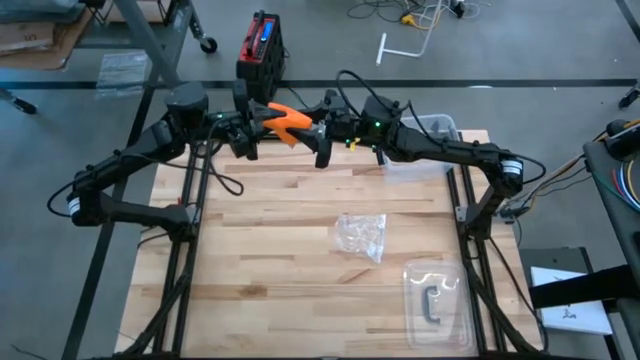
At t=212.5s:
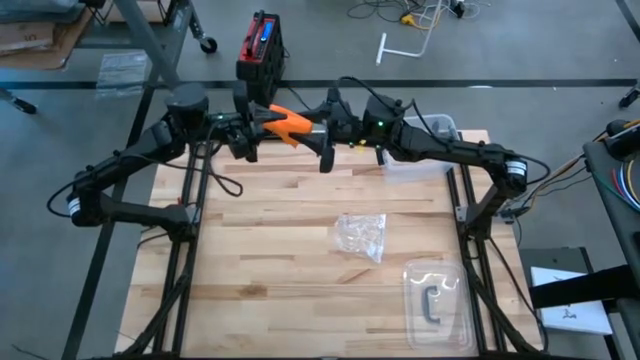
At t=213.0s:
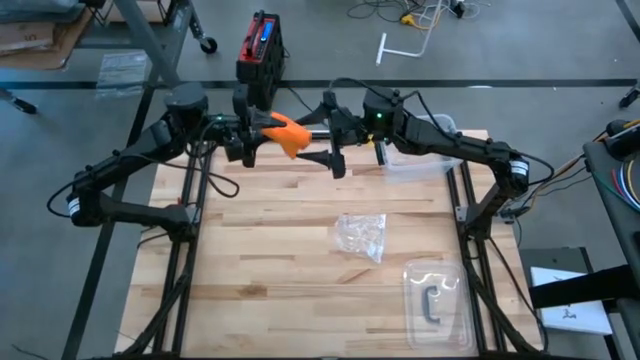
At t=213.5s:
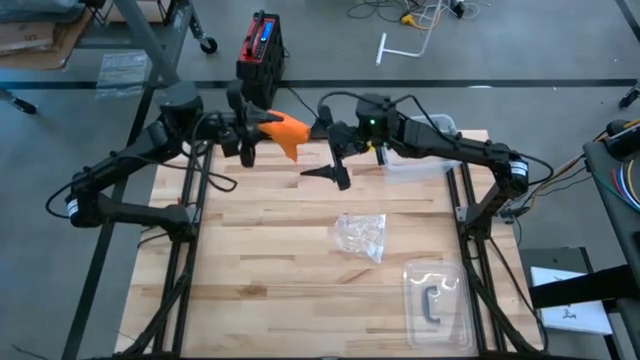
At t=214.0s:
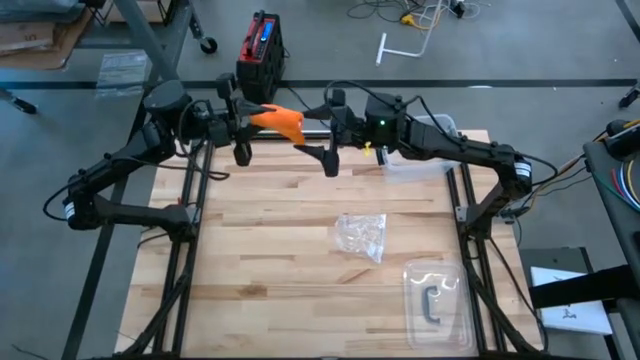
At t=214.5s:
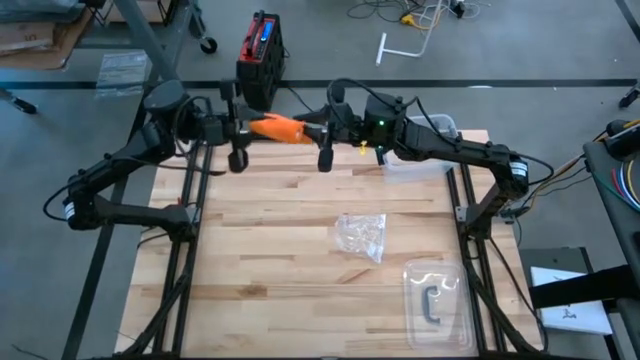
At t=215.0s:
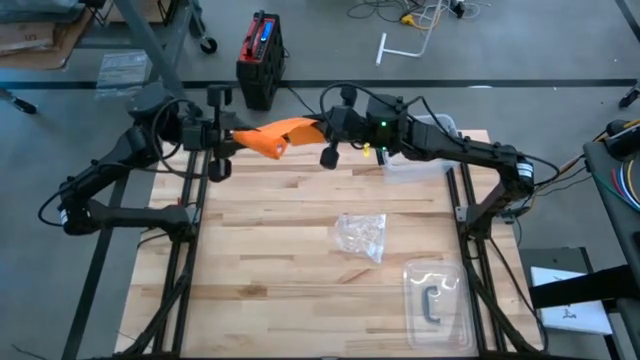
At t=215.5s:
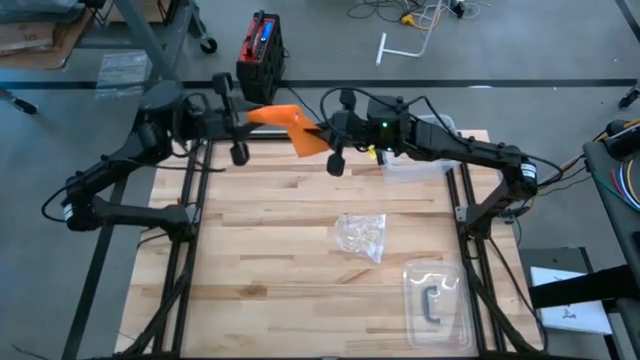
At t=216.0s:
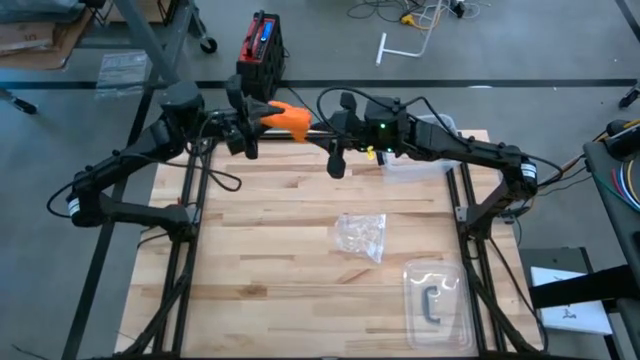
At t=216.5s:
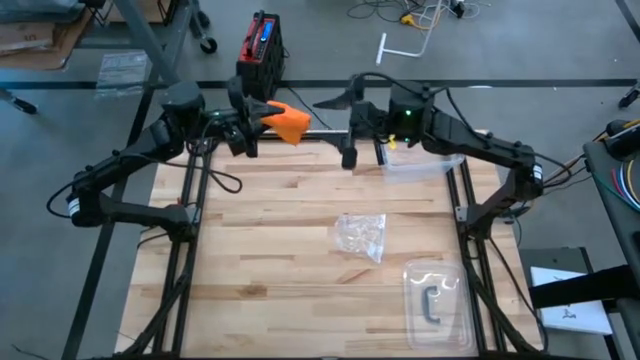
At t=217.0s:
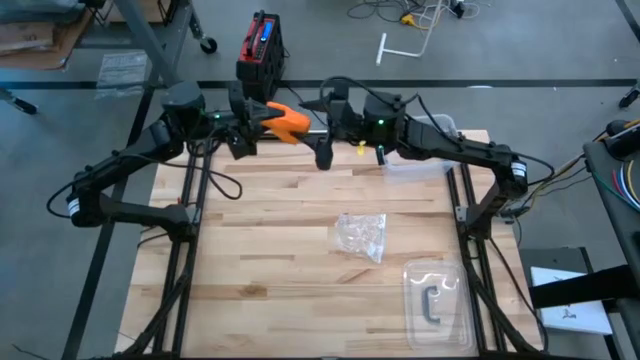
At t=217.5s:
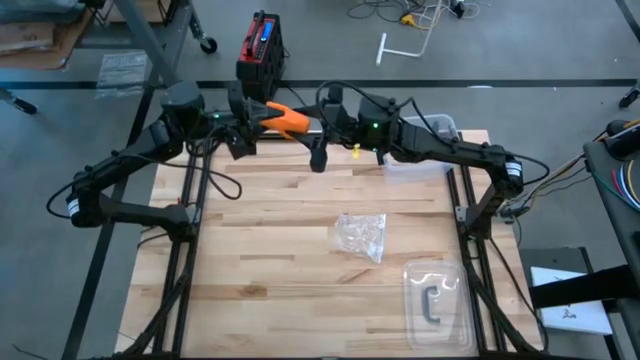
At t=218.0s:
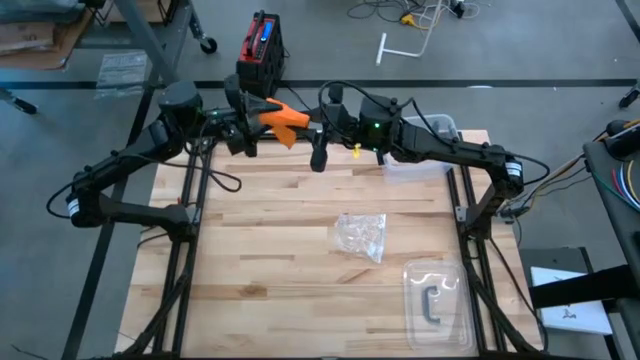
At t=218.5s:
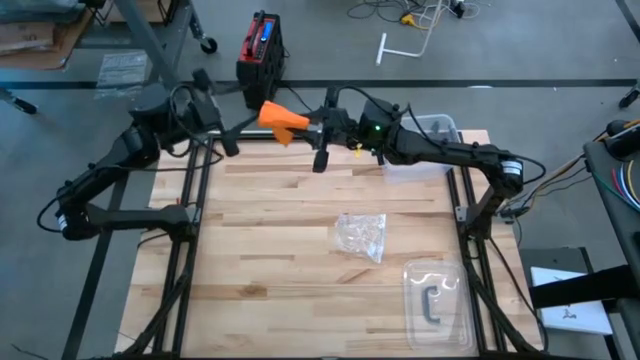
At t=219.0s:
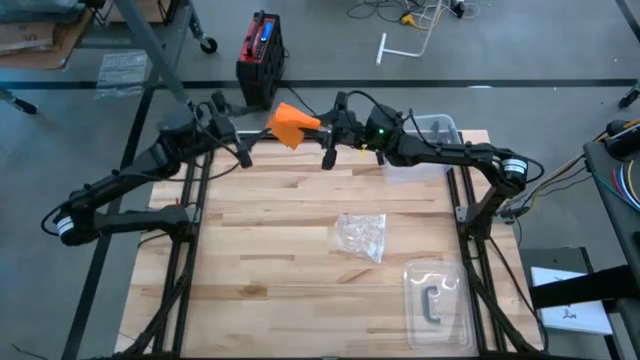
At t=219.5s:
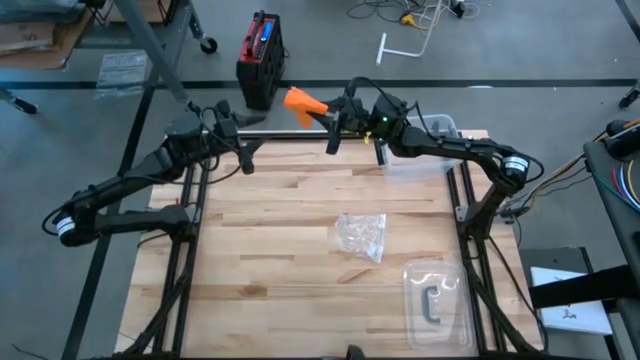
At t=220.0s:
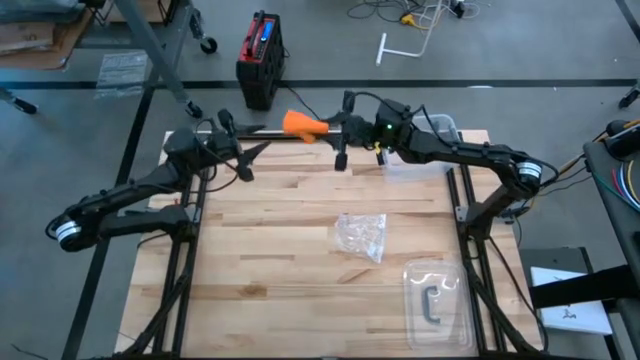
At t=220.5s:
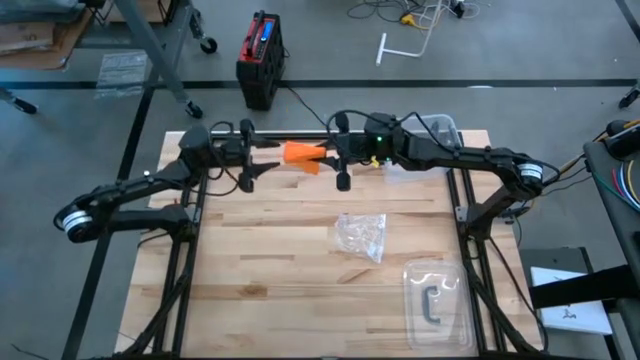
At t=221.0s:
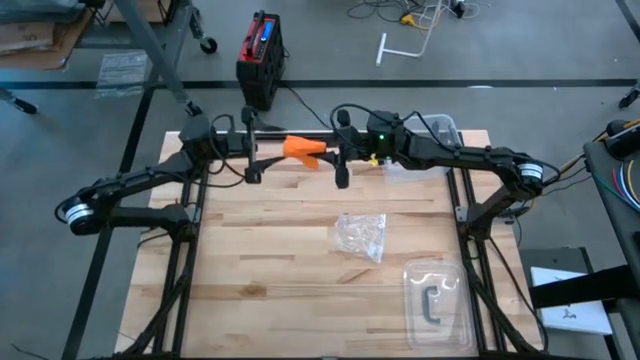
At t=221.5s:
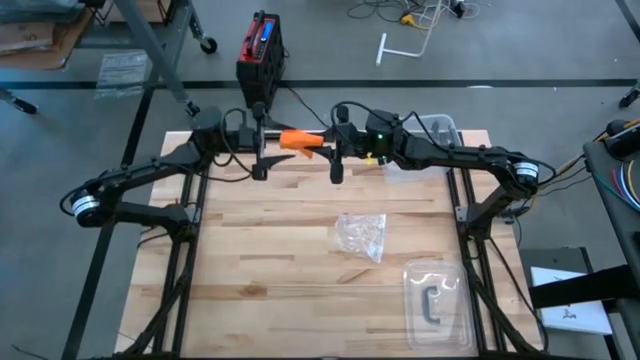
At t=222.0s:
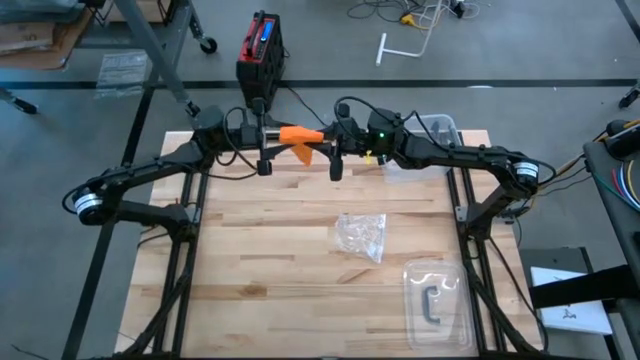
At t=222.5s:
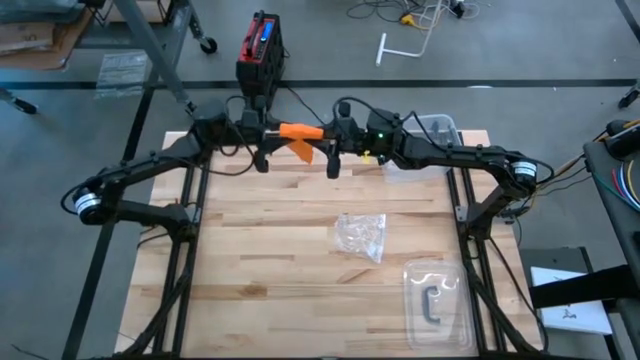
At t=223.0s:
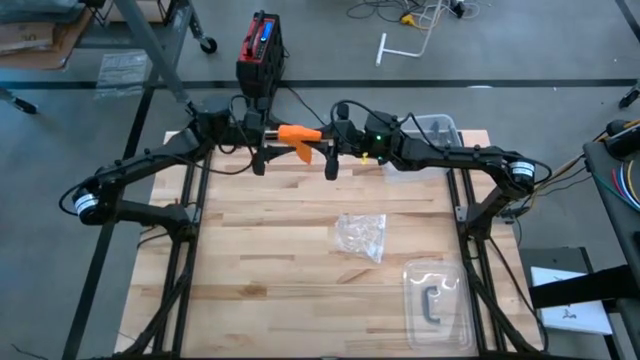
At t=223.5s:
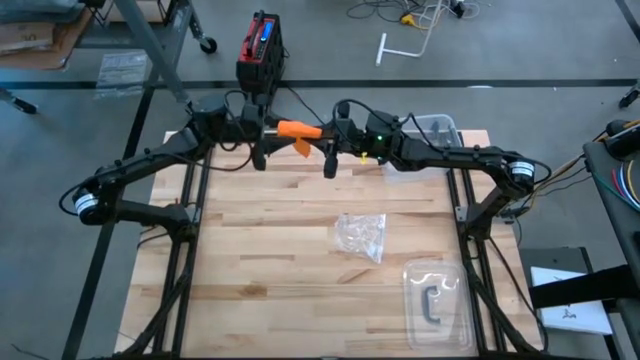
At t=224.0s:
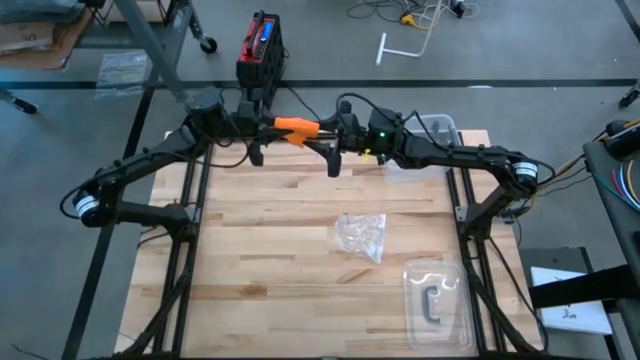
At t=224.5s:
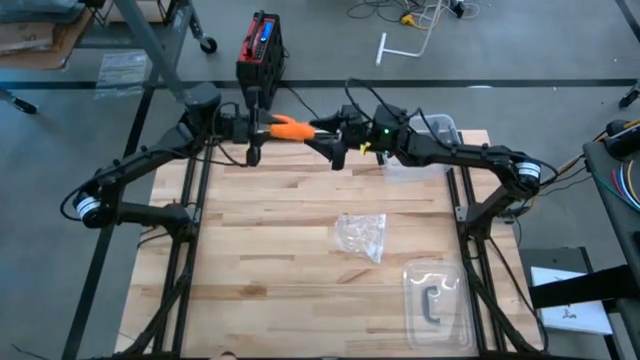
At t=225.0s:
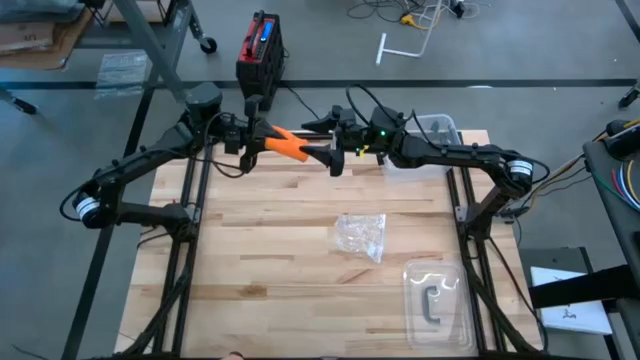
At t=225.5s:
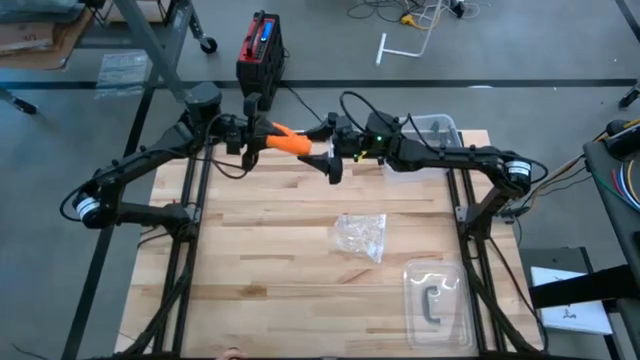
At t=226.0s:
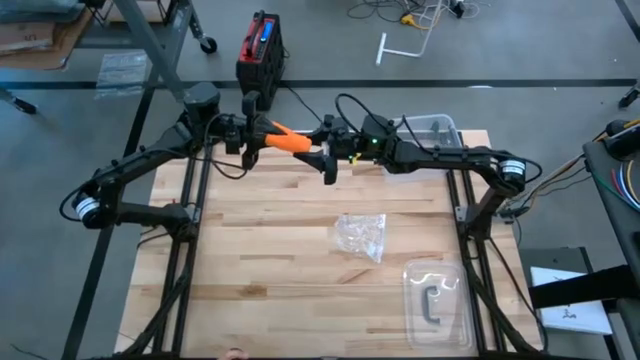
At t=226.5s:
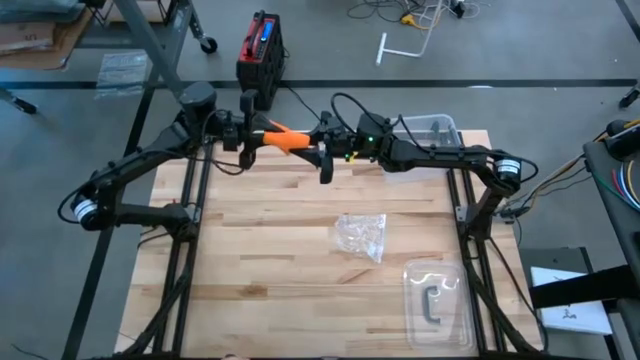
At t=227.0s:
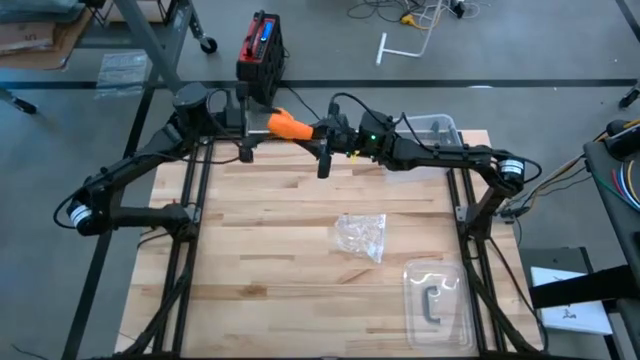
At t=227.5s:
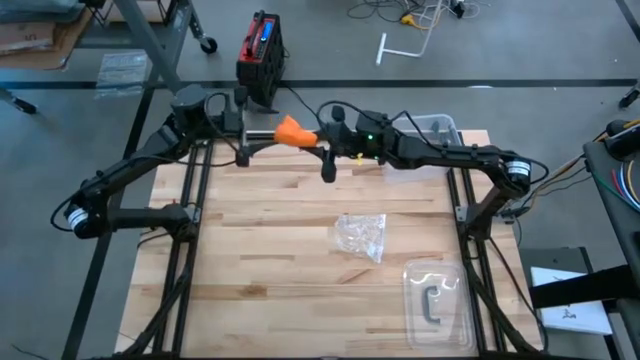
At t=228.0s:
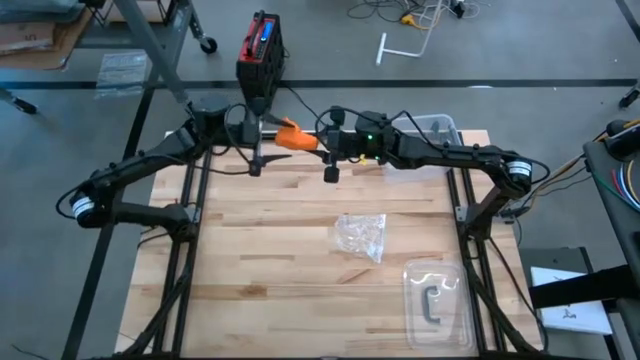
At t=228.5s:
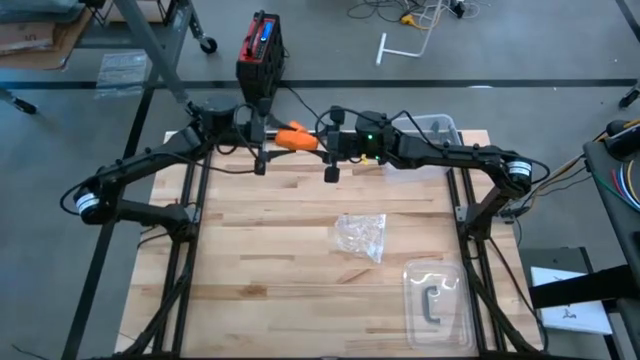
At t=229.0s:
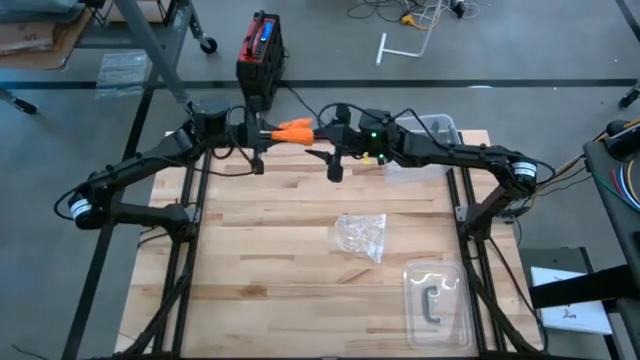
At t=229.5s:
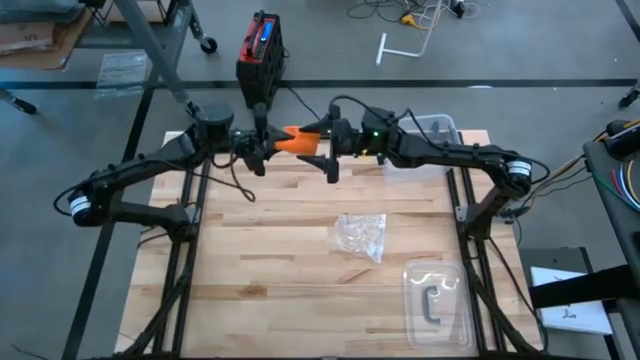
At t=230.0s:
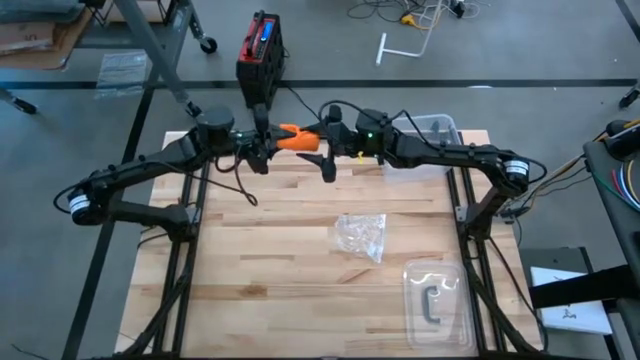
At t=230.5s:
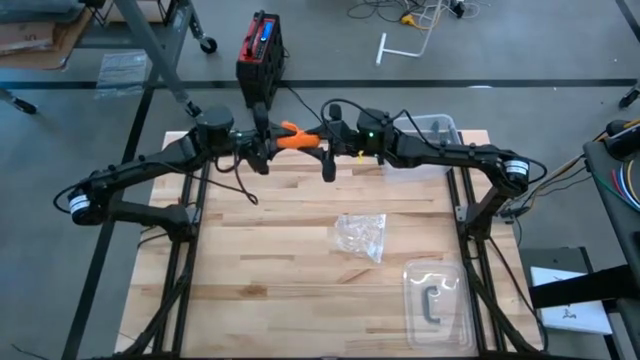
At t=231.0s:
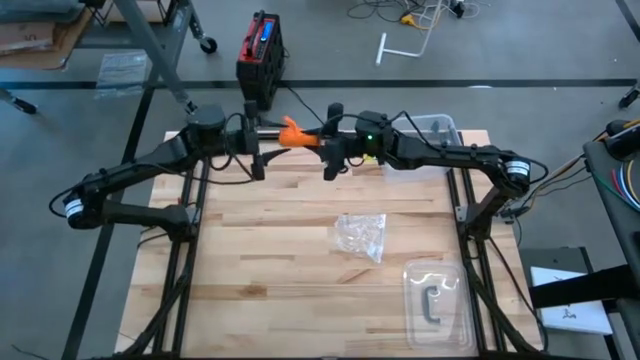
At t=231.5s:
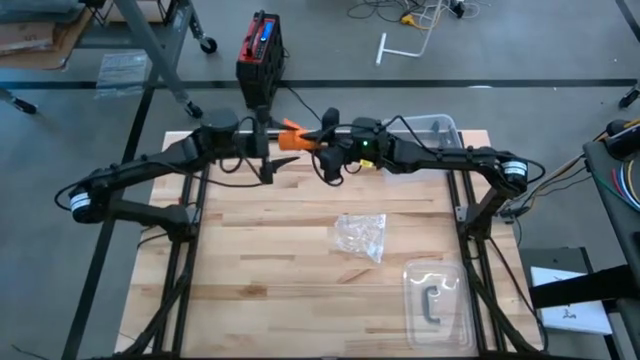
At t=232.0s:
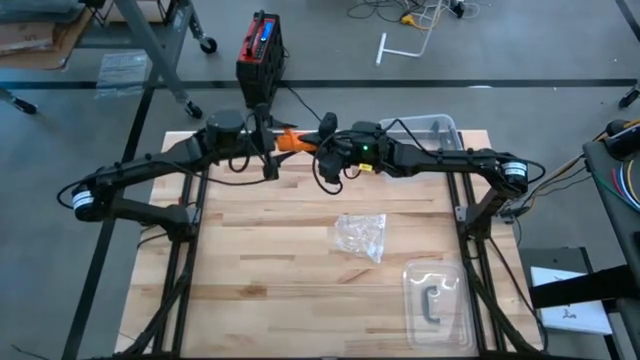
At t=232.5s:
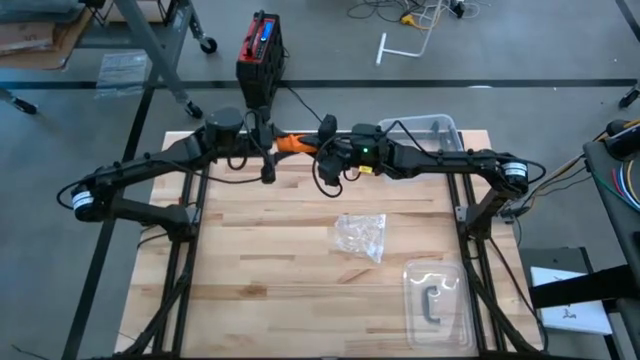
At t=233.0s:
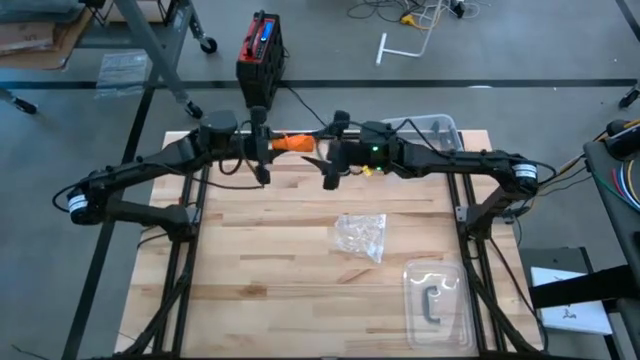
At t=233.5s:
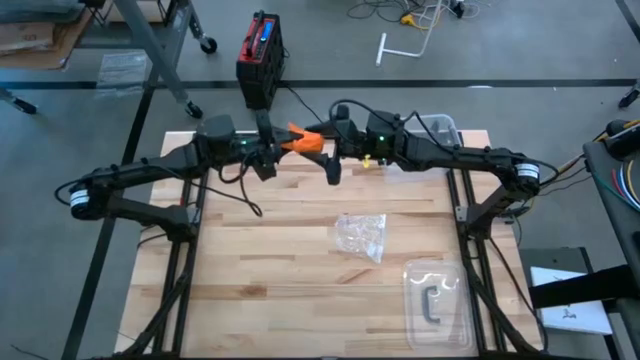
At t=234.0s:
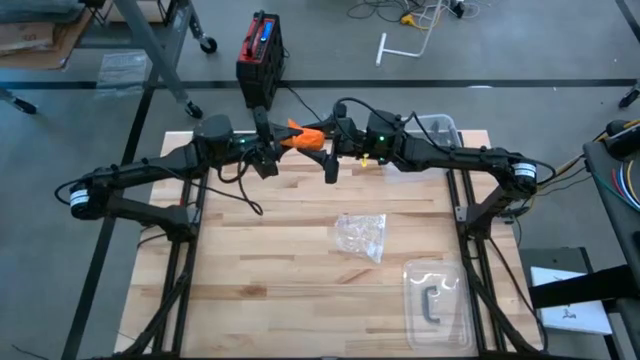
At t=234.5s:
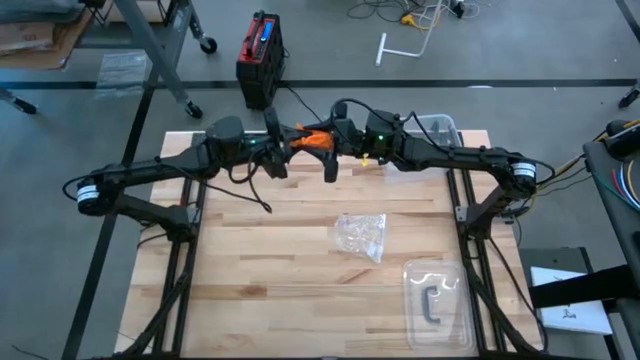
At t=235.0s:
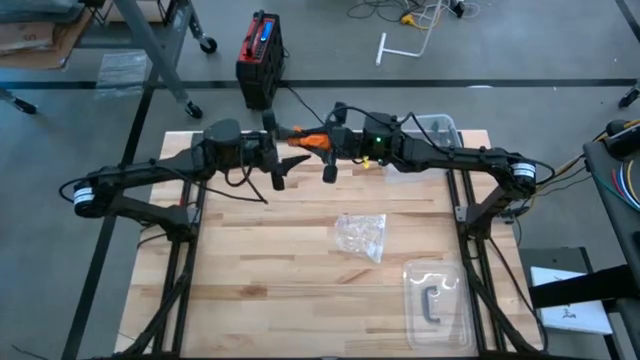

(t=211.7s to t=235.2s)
Task: Roll bandage
Roll the orange bandage
